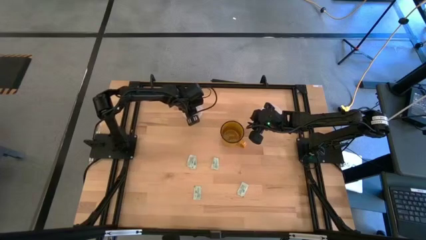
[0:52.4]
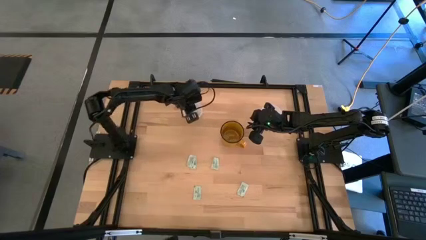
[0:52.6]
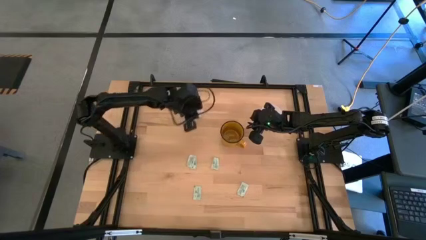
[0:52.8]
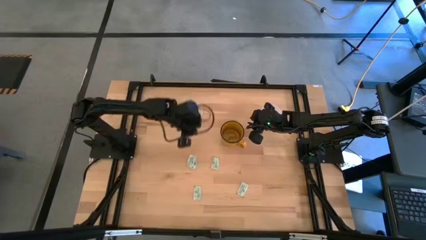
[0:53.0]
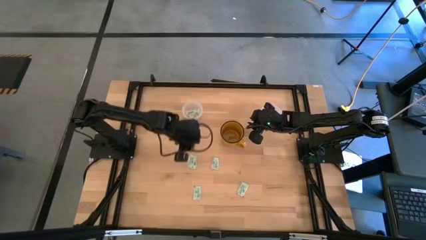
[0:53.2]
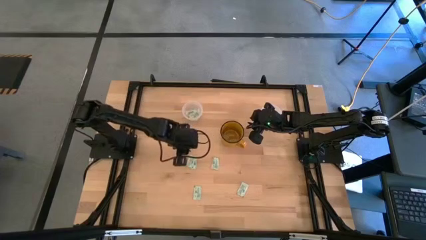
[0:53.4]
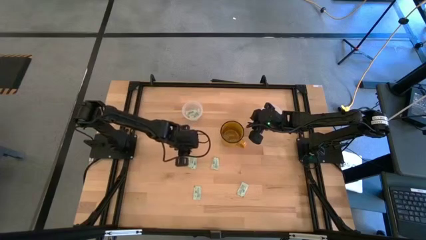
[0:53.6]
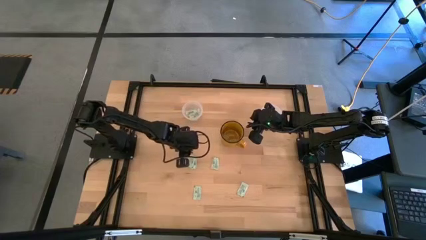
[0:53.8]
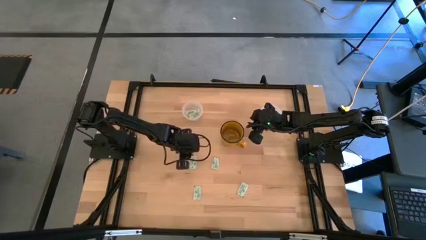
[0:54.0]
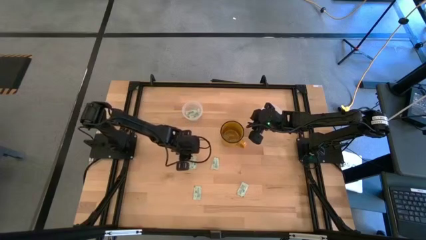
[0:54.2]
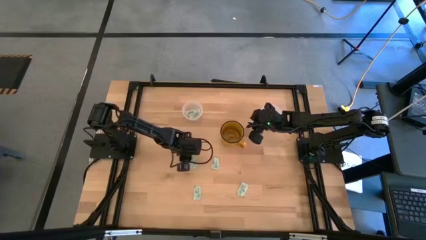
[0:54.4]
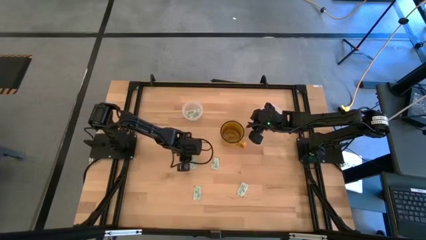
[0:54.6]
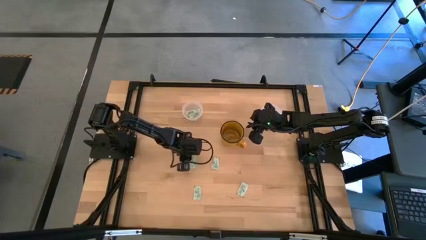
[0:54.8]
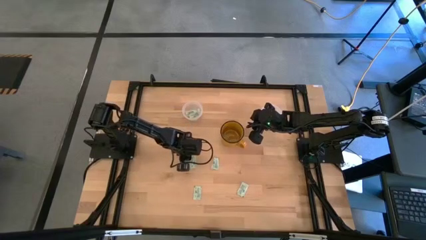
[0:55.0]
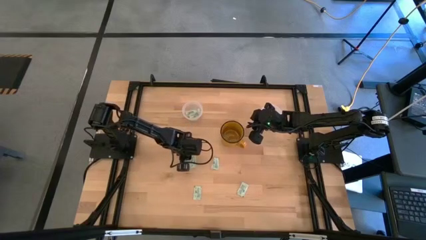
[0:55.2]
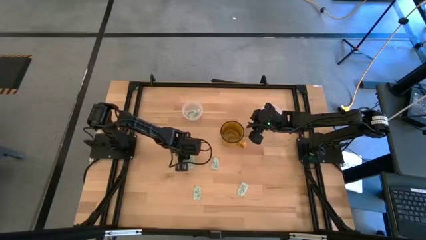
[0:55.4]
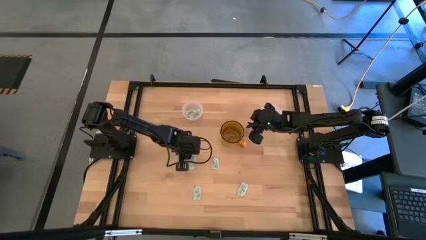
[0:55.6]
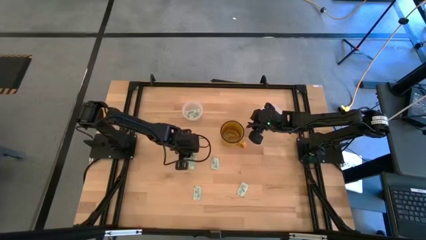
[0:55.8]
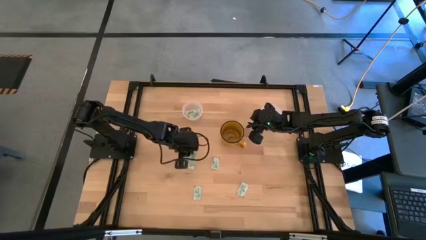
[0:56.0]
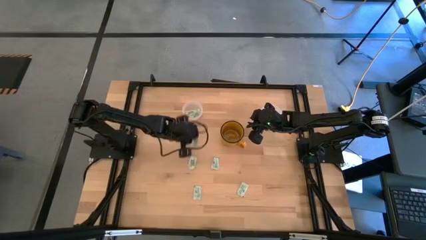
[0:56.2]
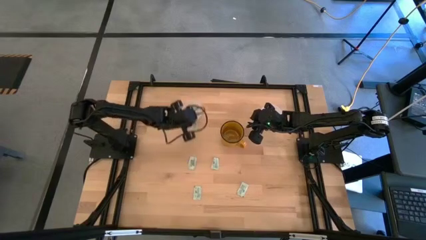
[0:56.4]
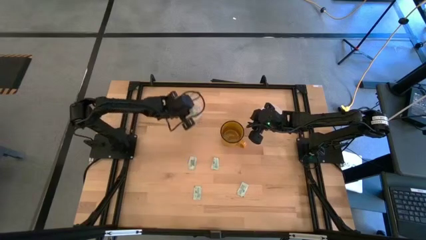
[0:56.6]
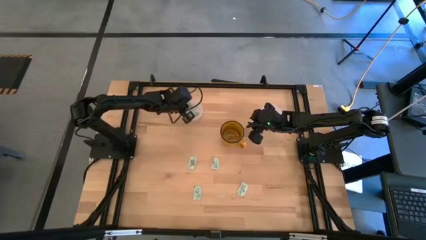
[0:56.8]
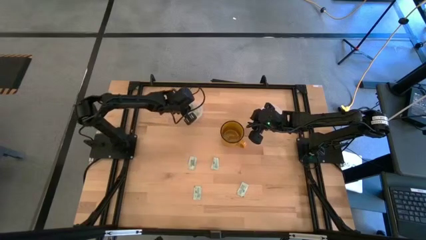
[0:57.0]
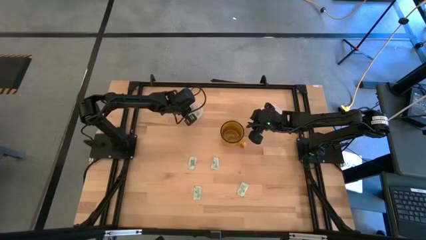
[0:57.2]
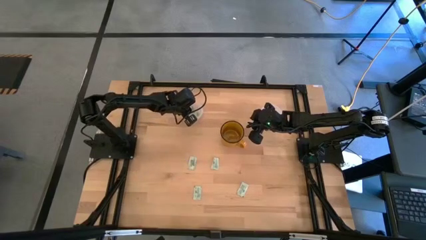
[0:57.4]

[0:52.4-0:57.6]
Task: Pick and place Stevia / Truvia into bins
Put the white stevia packet into the left transparent container

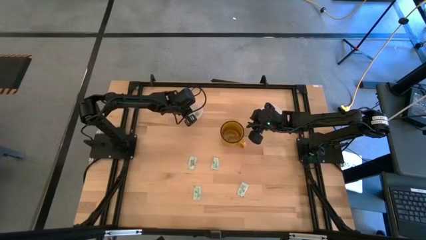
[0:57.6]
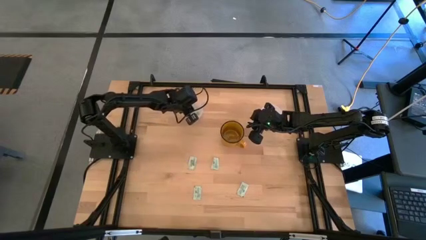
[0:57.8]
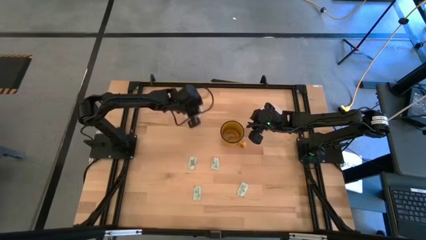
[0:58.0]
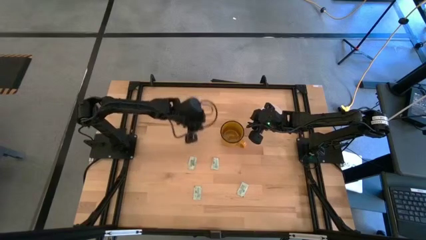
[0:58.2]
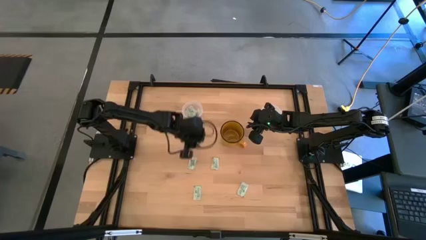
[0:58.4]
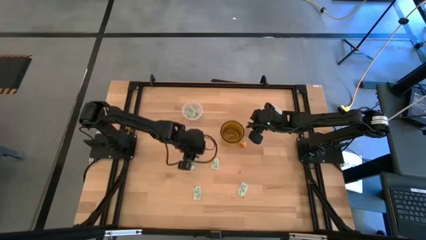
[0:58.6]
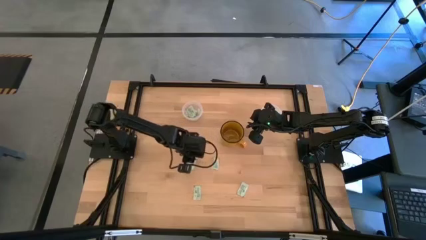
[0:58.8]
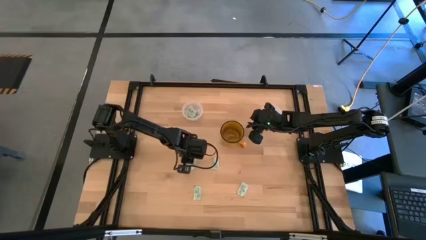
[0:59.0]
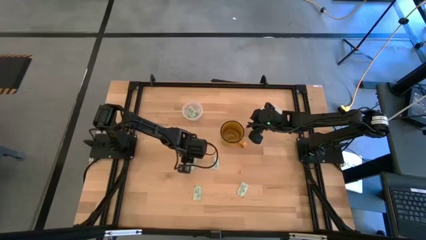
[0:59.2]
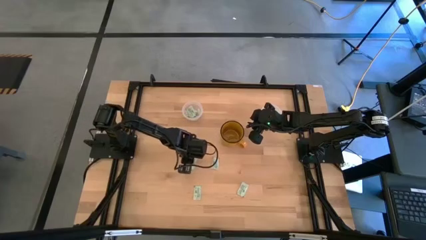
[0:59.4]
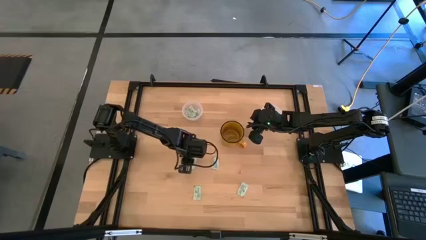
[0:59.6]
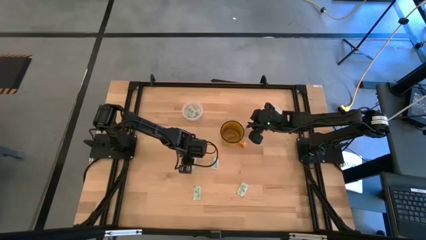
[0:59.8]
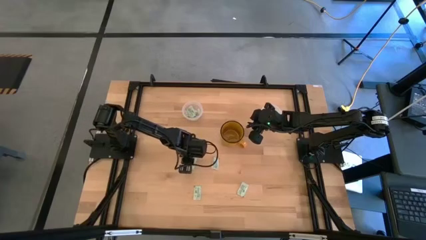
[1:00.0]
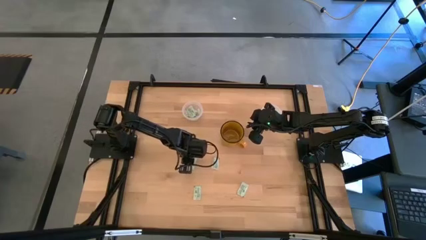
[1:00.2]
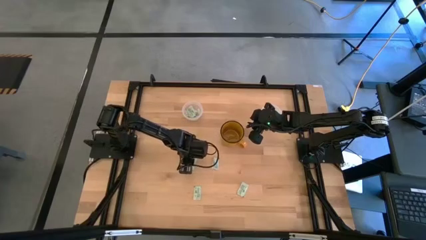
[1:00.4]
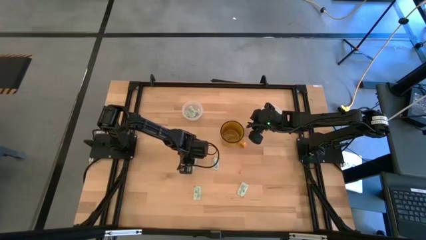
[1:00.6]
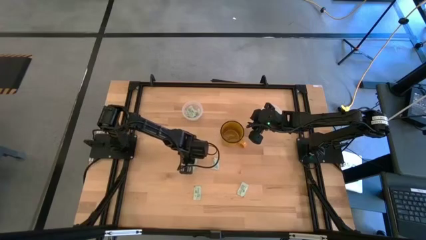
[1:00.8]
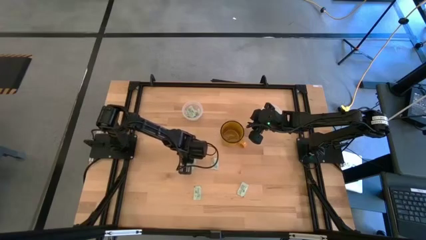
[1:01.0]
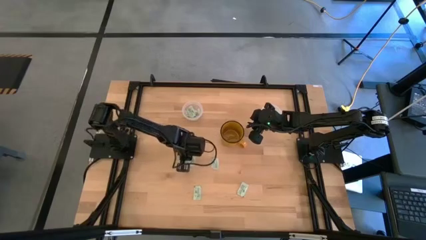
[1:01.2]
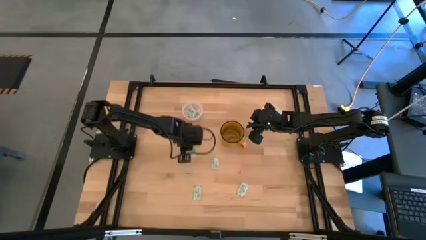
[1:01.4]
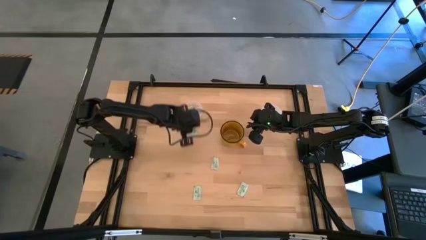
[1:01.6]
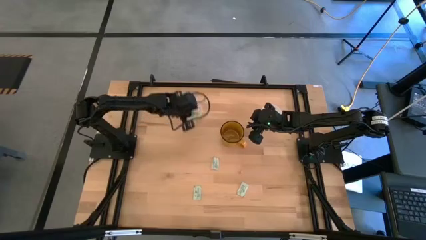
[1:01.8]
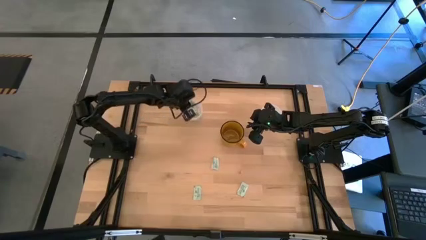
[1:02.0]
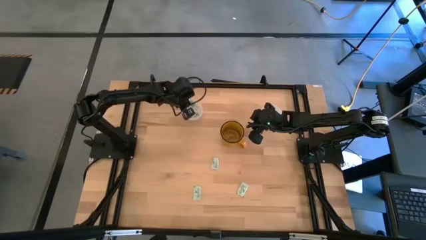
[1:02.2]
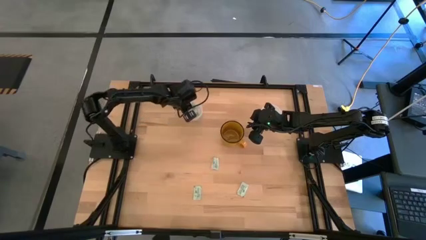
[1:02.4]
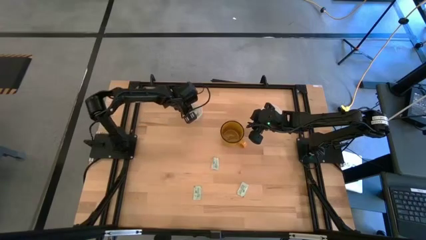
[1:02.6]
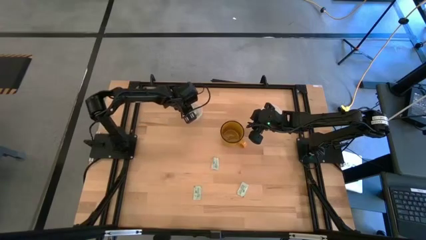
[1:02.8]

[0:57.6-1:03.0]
Put the white stevia packet into the left transparent container

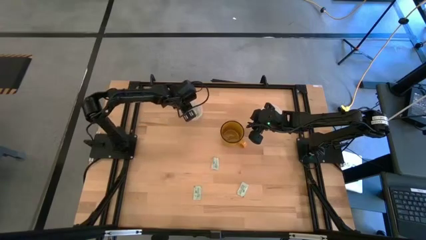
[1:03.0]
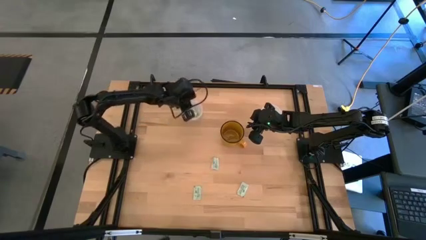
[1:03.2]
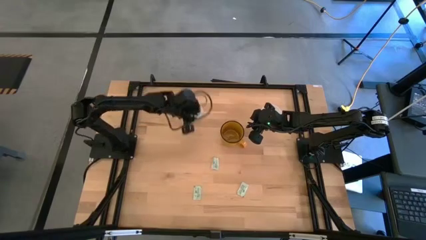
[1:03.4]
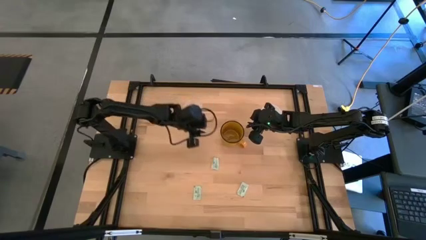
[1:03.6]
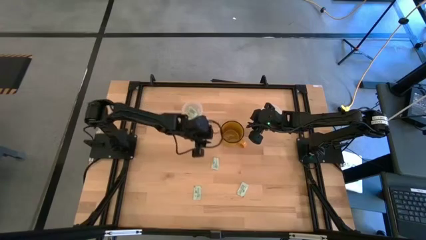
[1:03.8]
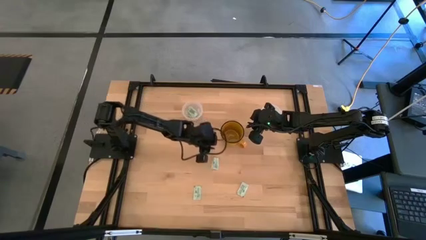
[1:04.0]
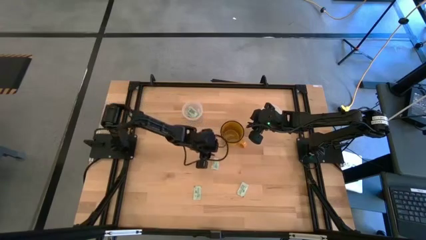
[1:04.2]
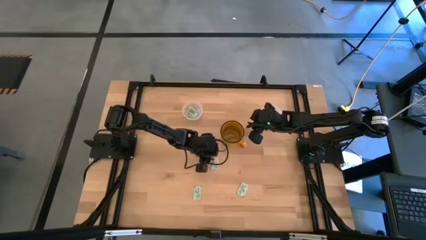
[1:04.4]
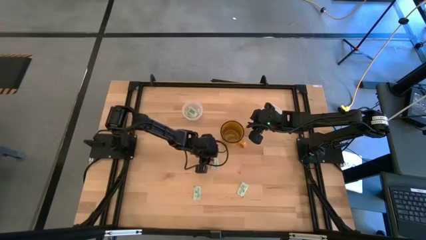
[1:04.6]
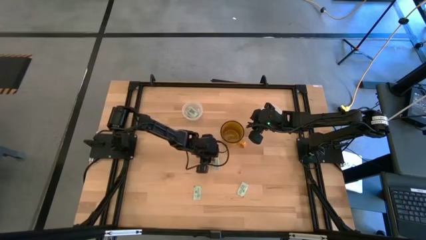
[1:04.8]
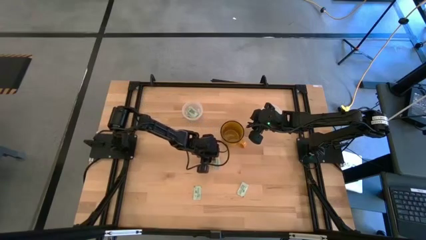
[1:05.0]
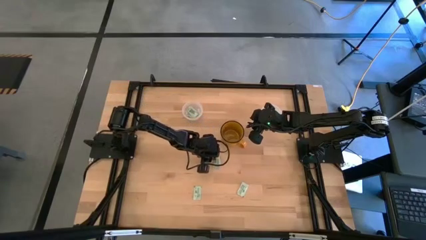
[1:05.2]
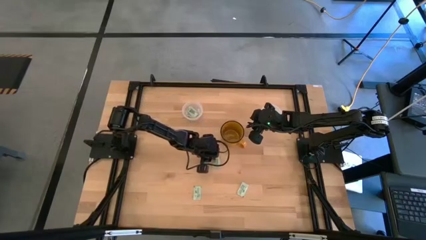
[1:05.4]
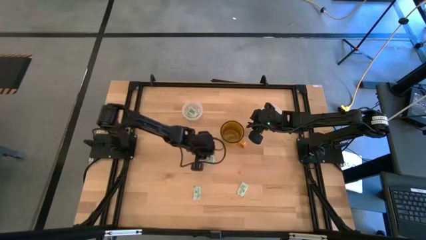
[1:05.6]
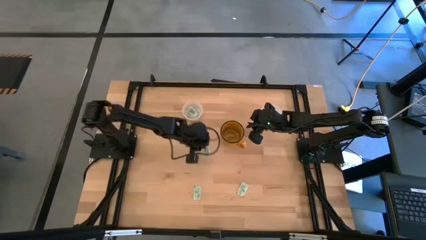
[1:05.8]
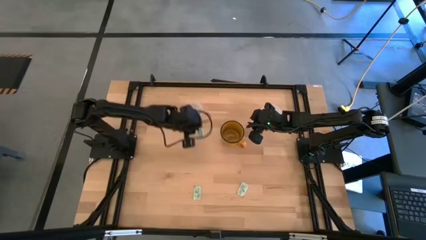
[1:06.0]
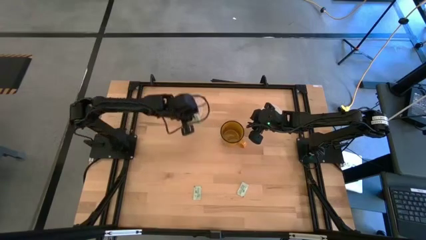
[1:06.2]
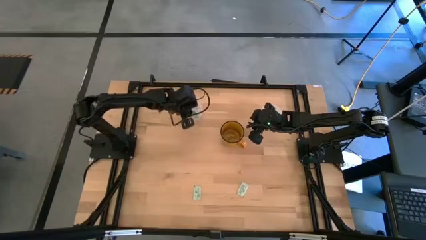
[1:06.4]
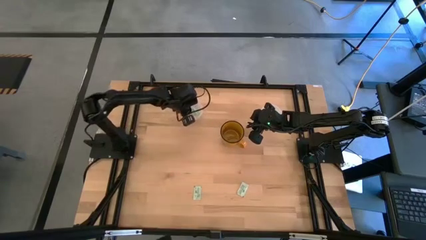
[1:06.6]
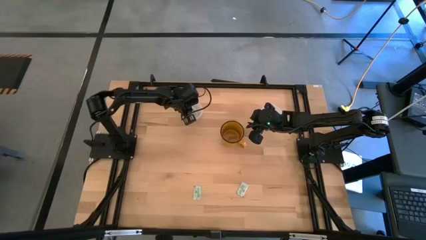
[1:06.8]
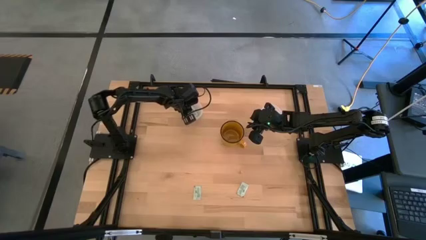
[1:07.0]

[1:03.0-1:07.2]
Put the white stevia packet into the left transparent container

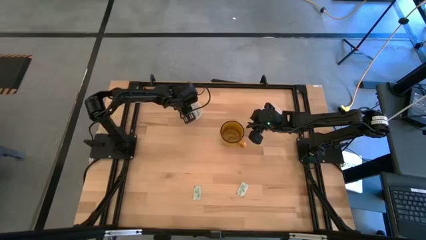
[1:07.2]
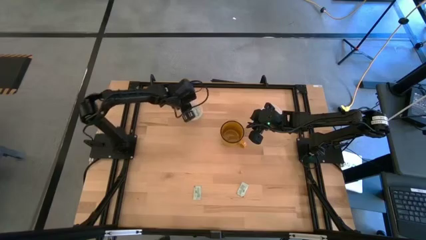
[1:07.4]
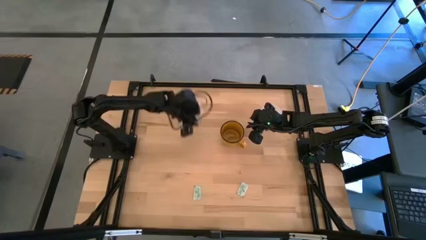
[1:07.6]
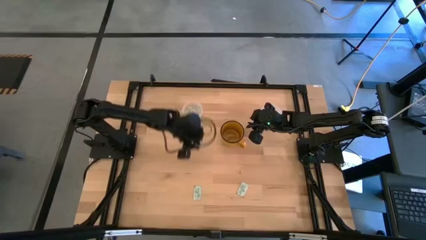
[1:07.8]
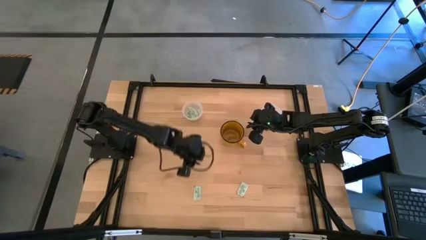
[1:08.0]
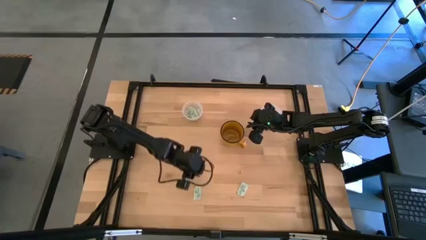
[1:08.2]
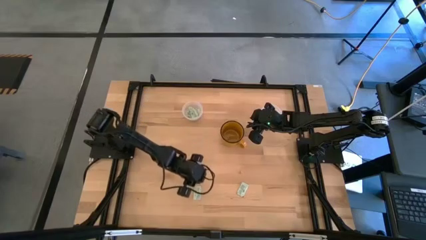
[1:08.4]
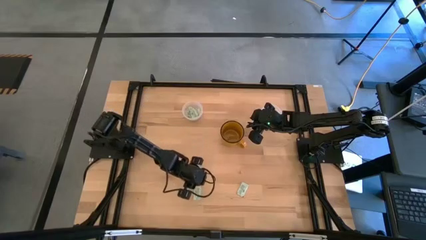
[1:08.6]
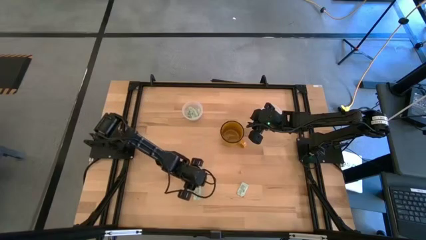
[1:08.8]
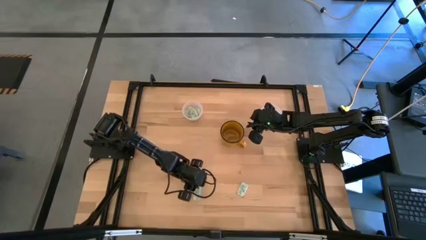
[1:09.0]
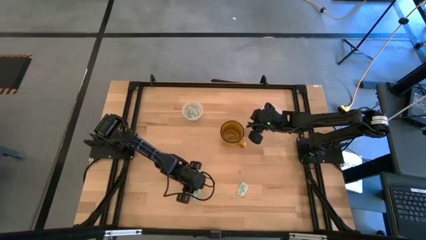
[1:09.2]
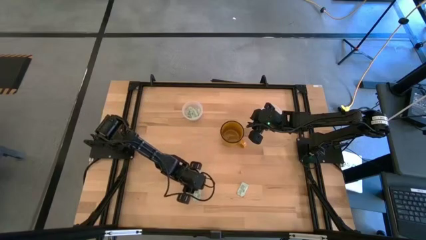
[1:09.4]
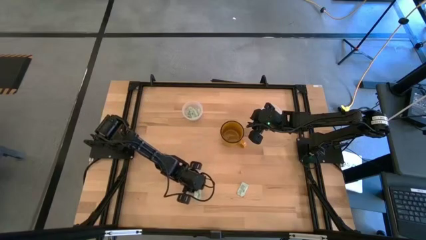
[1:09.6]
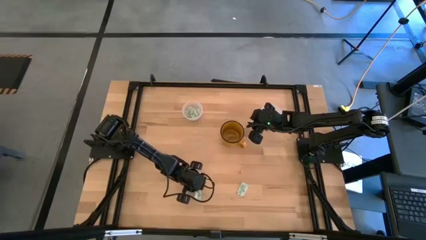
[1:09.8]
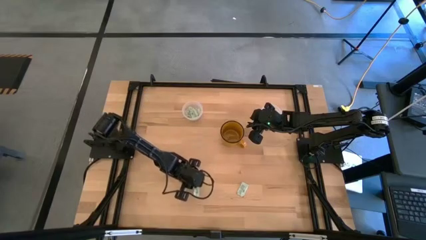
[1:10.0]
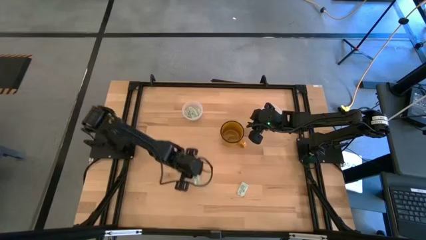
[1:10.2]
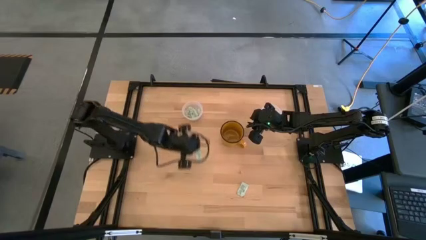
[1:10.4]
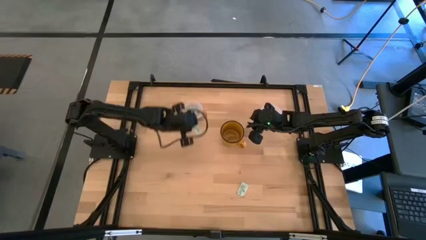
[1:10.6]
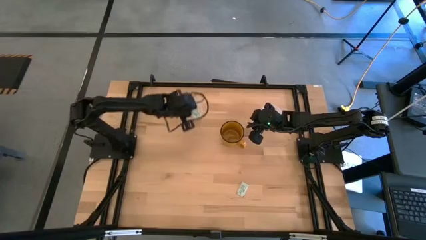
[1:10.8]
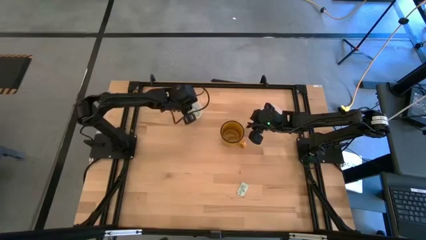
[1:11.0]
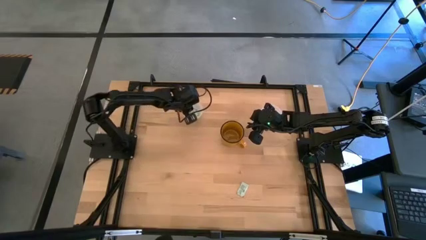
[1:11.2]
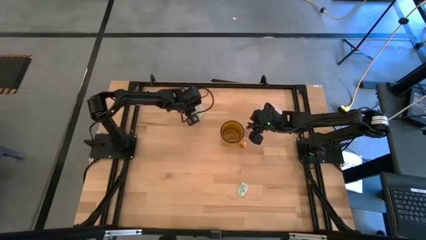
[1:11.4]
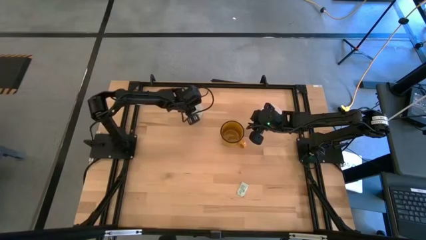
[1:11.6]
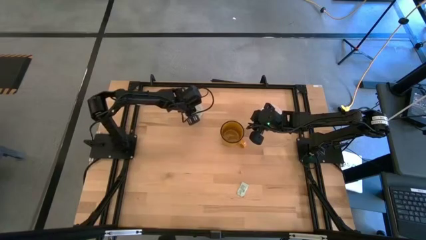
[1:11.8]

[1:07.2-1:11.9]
Put the white stevia packet into the left transparent container
